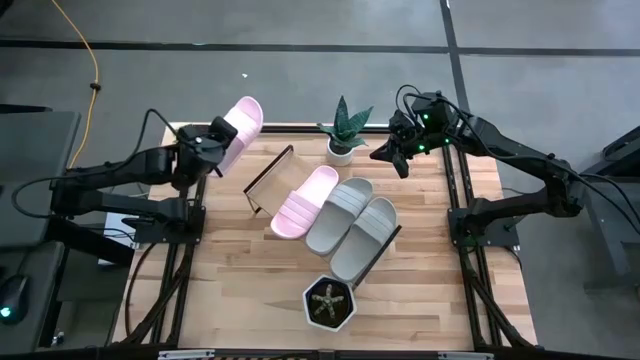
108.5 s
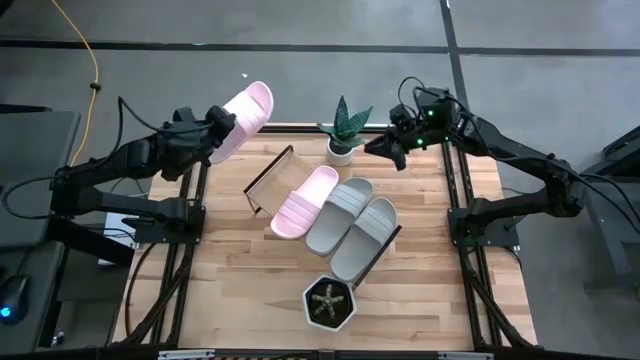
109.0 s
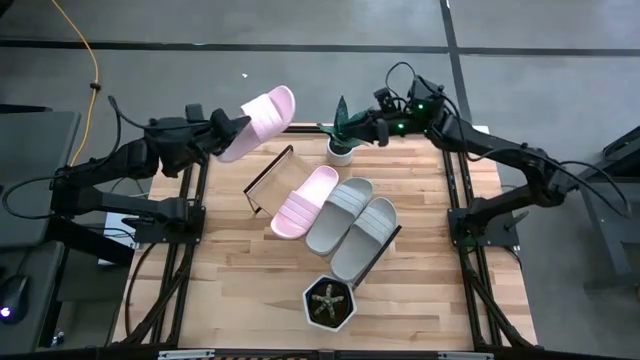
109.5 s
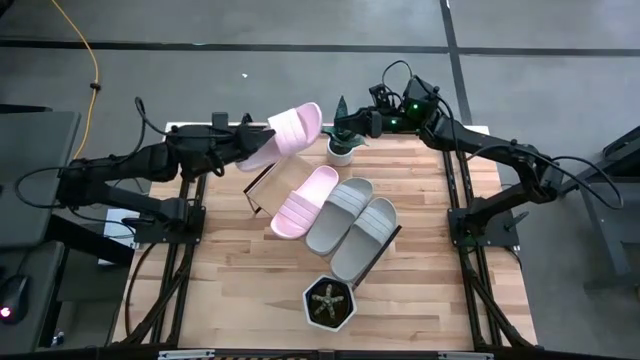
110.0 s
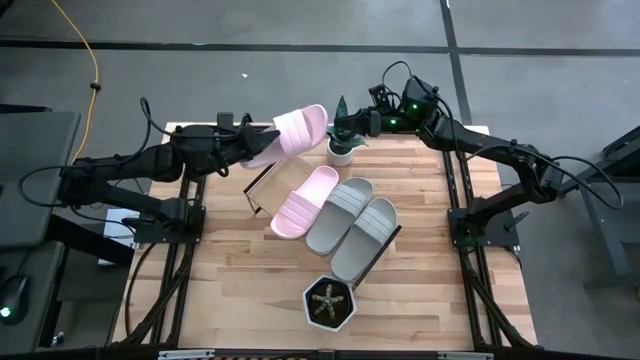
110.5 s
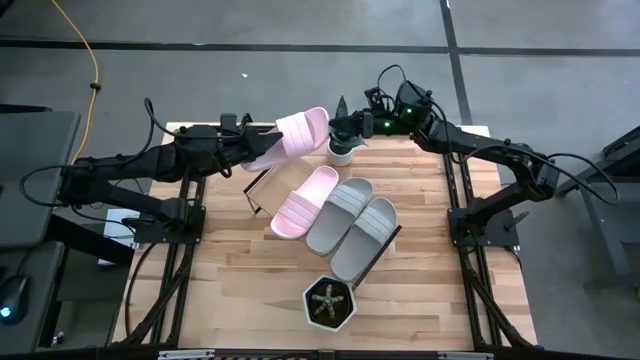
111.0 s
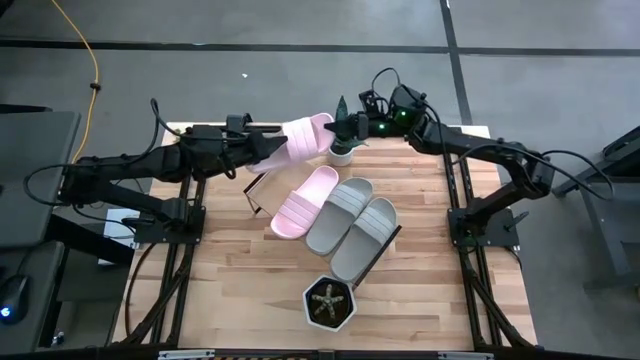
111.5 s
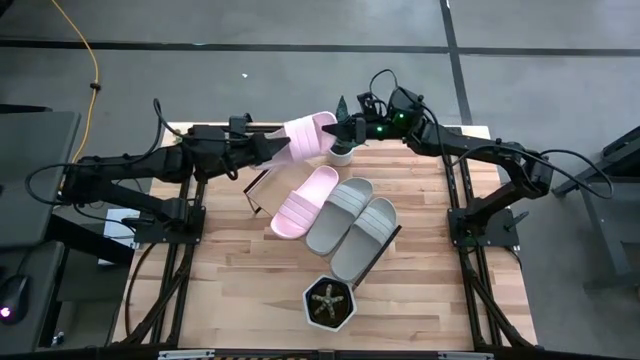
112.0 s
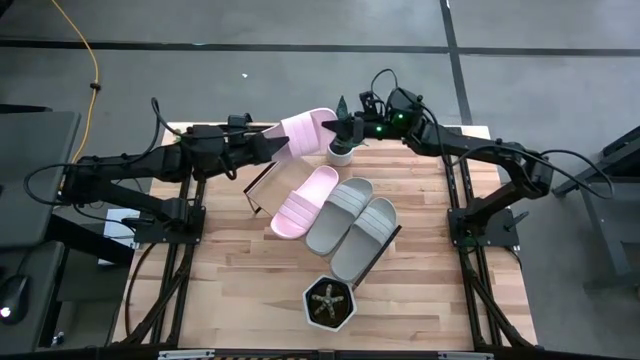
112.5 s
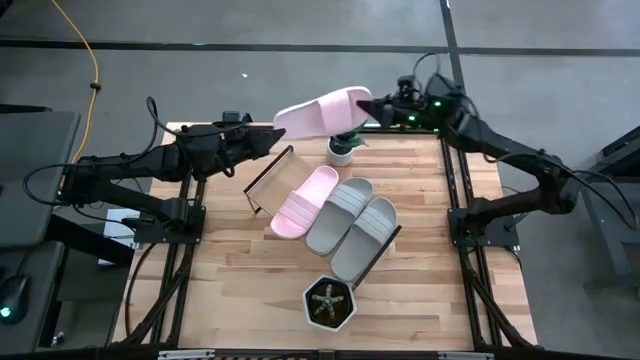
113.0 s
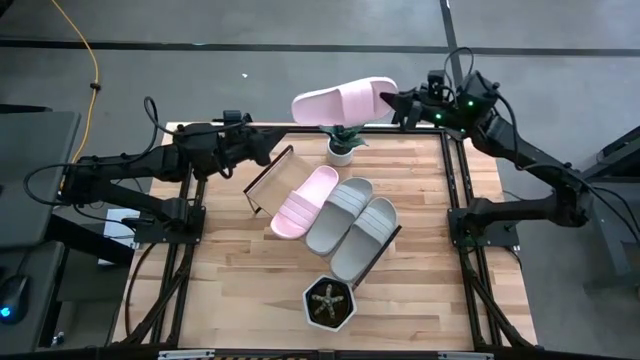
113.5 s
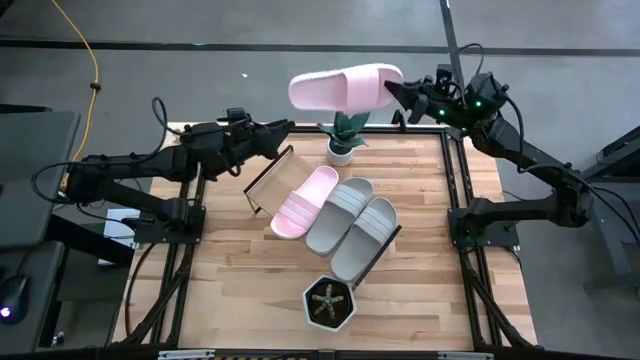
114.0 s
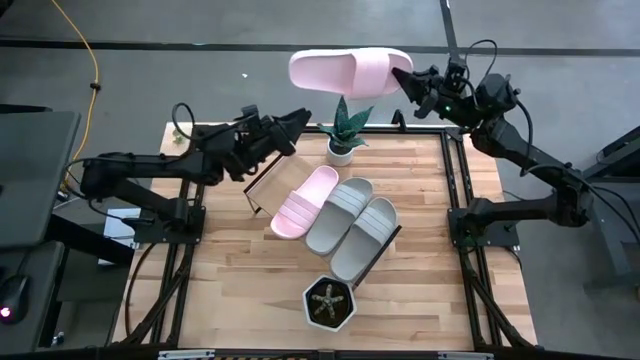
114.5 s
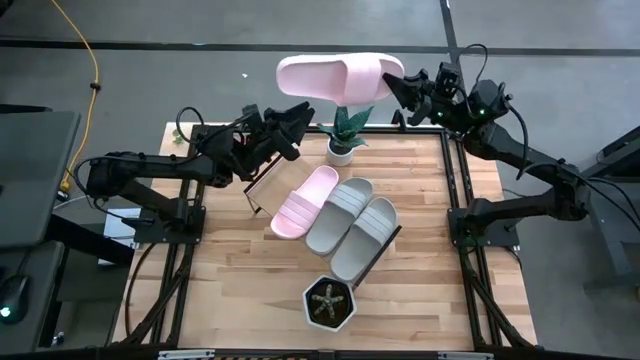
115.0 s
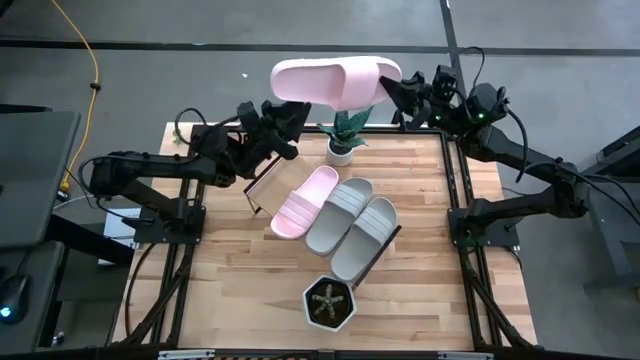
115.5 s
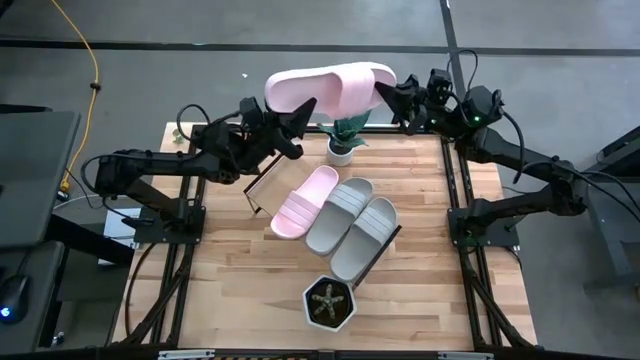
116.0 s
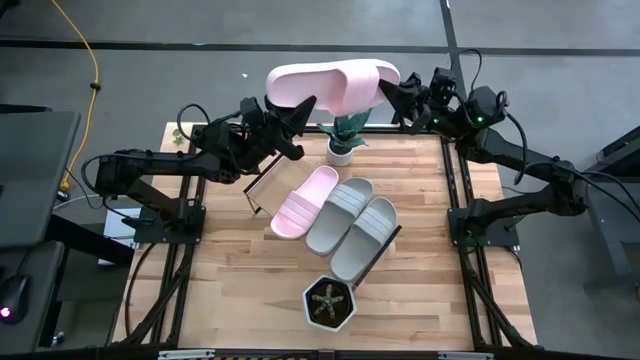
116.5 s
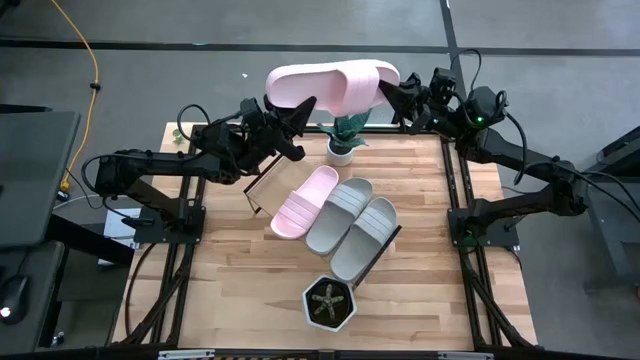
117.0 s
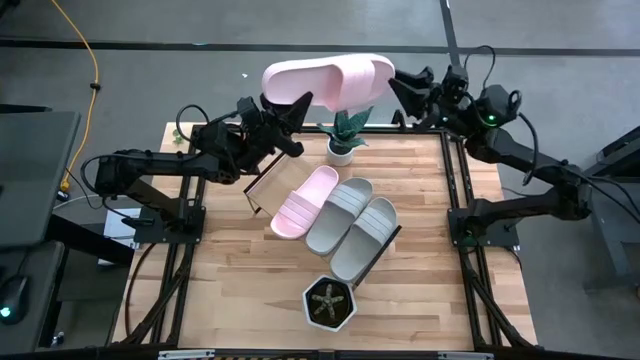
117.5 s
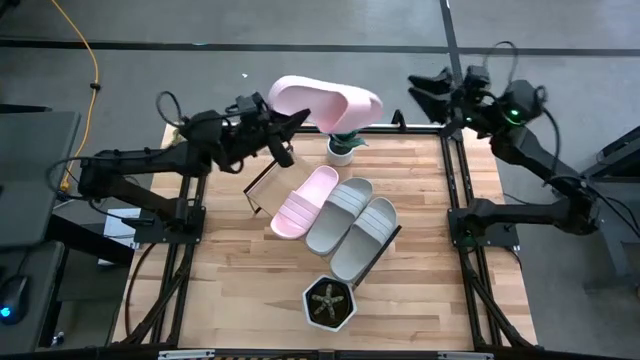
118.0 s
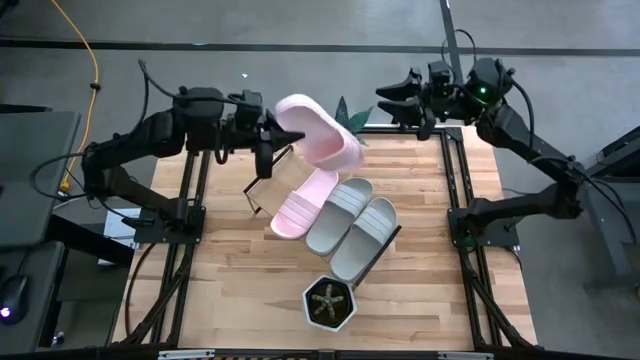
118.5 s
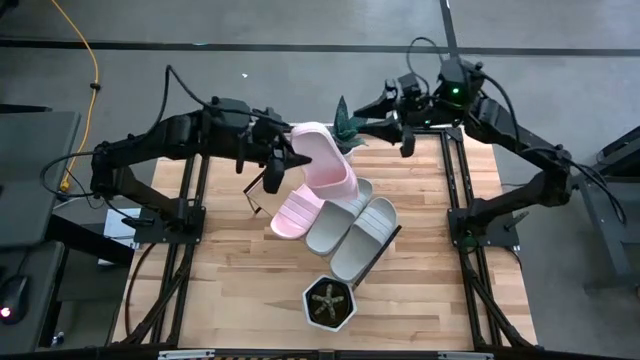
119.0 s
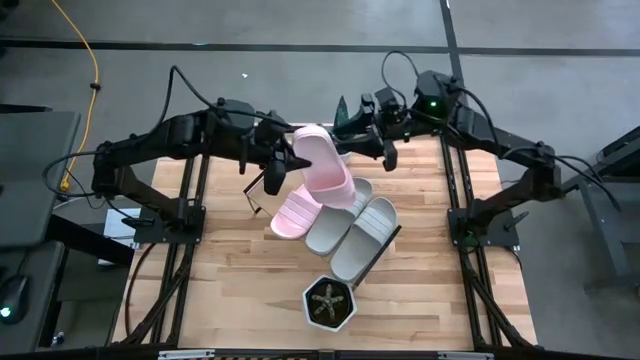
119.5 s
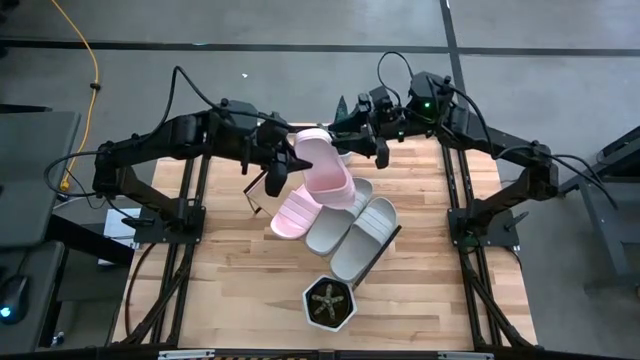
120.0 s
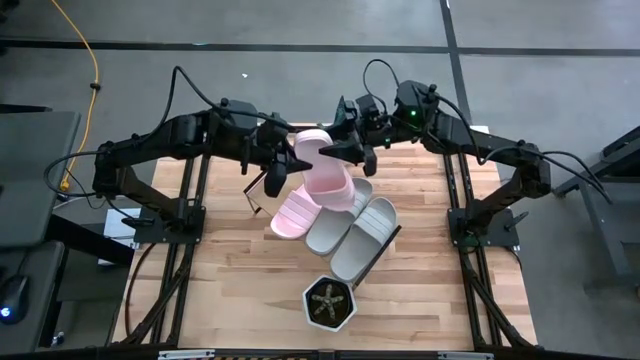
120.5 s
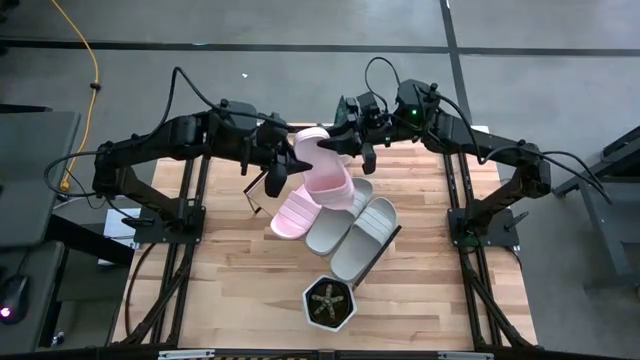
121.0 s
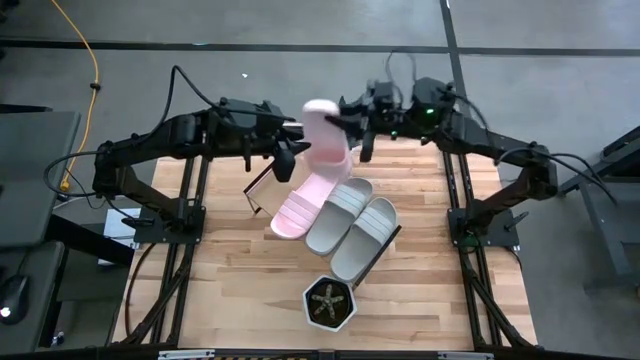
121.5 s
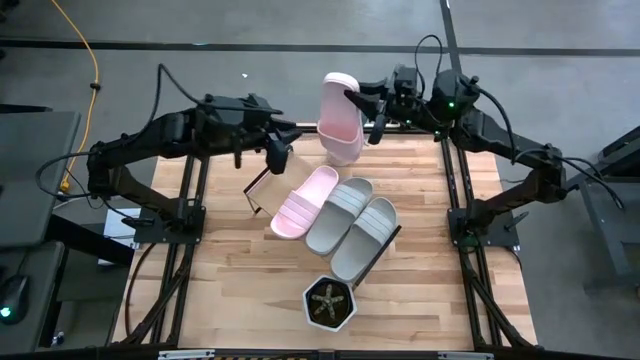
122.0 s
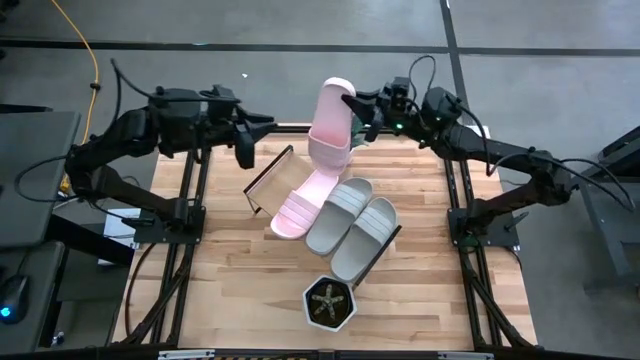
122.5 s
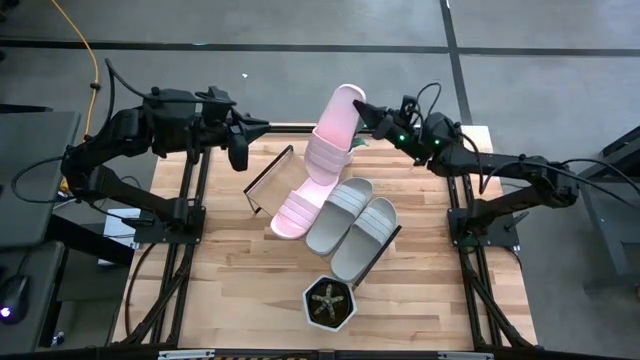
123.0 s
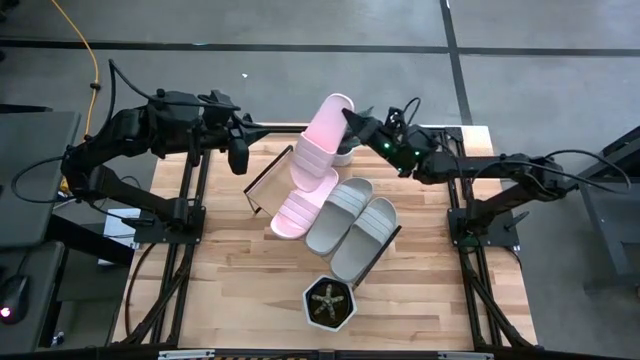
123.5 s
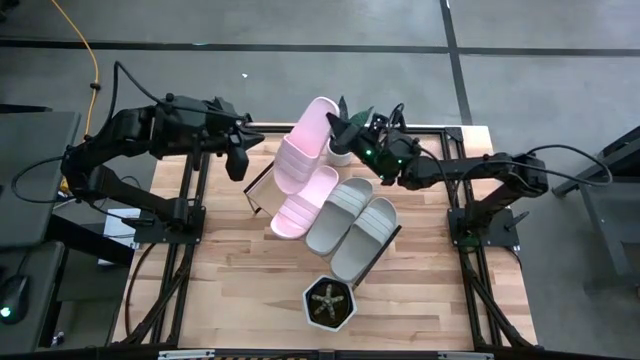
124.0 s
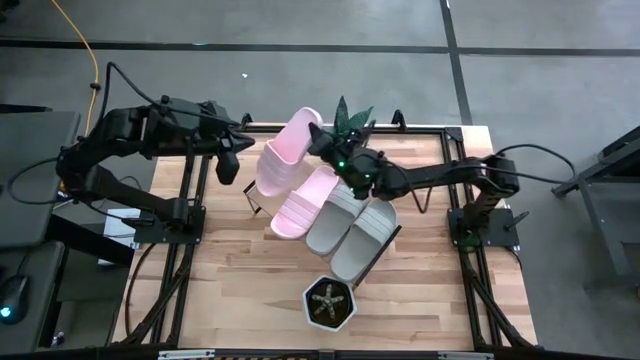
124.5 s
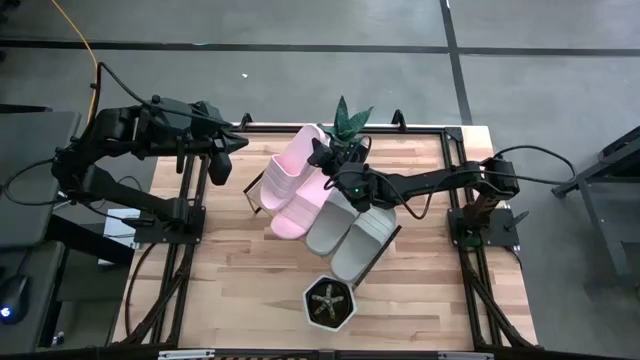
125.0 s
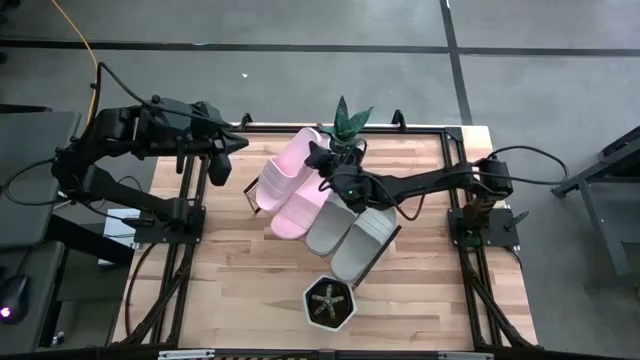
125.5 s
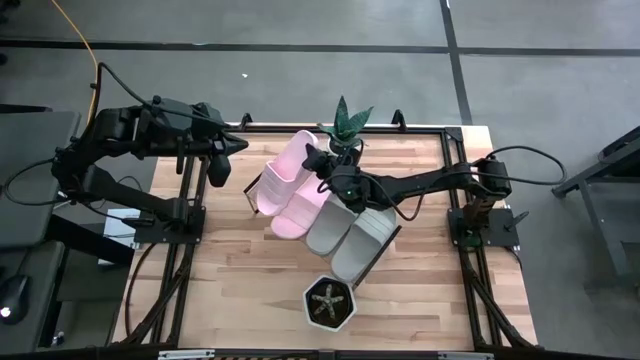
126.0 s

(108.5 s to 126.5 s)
Task: Pick and place slides into the shelf
Put the pink slipper on the shelf
